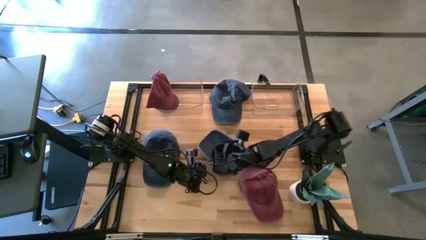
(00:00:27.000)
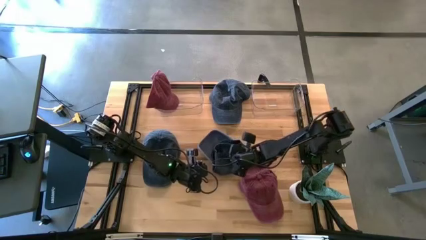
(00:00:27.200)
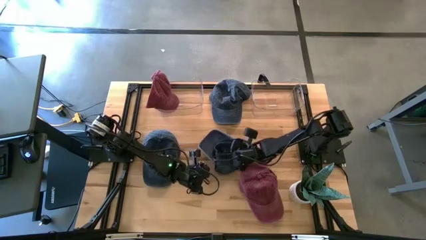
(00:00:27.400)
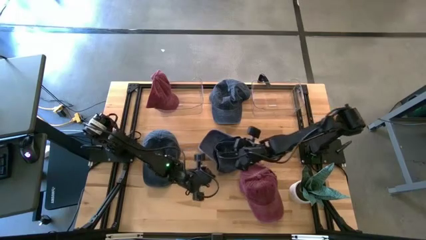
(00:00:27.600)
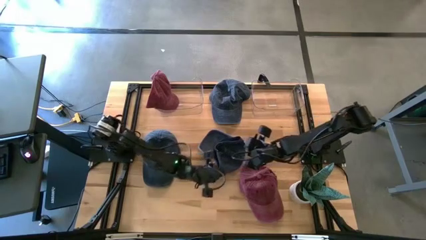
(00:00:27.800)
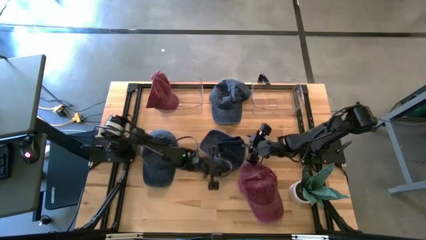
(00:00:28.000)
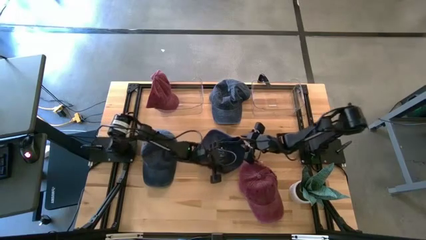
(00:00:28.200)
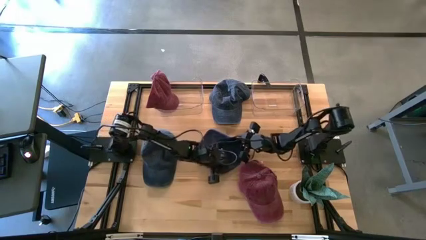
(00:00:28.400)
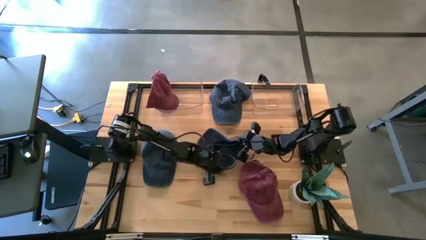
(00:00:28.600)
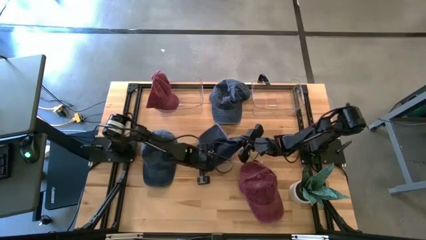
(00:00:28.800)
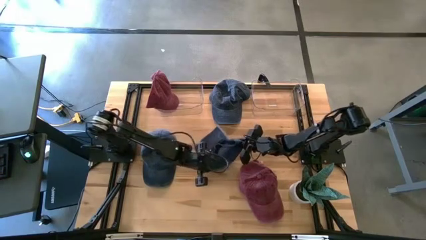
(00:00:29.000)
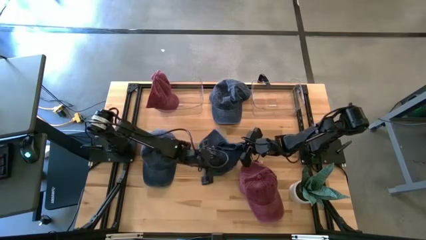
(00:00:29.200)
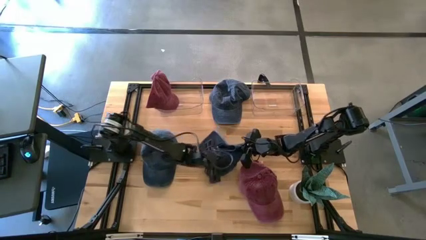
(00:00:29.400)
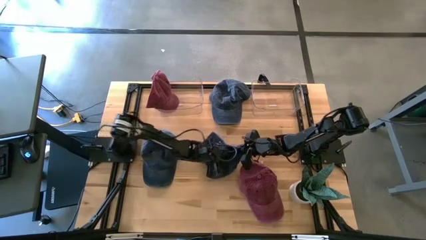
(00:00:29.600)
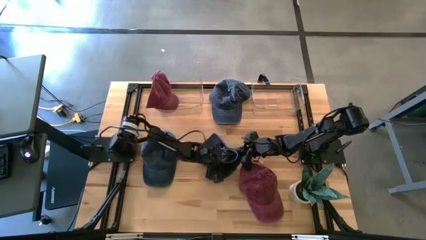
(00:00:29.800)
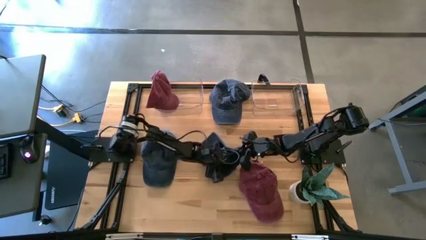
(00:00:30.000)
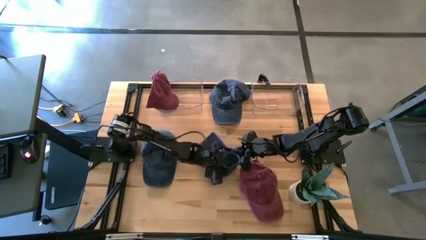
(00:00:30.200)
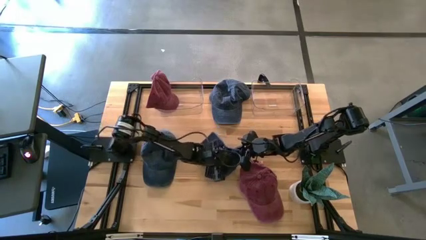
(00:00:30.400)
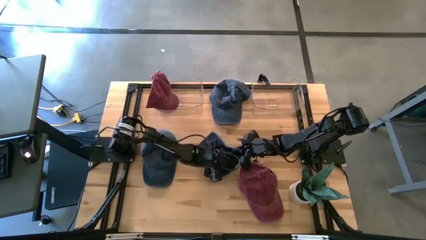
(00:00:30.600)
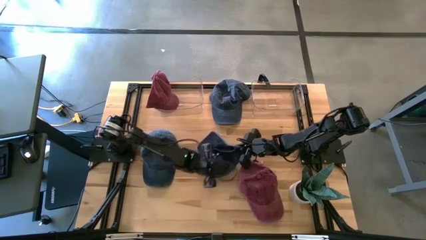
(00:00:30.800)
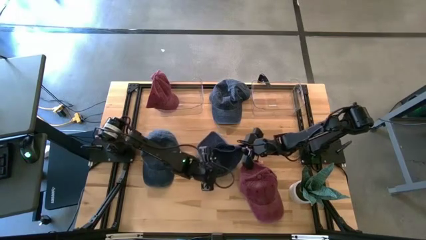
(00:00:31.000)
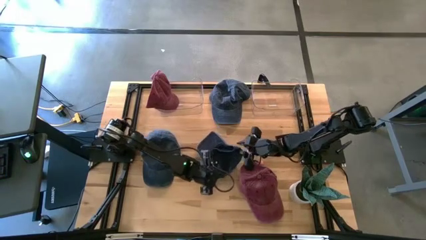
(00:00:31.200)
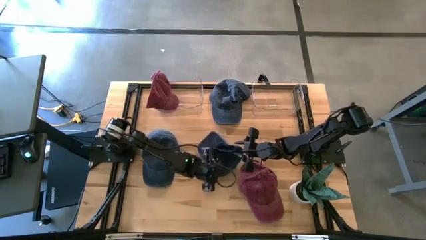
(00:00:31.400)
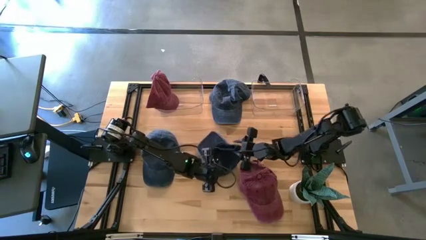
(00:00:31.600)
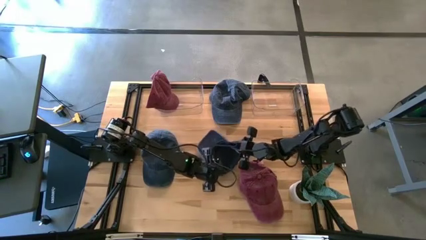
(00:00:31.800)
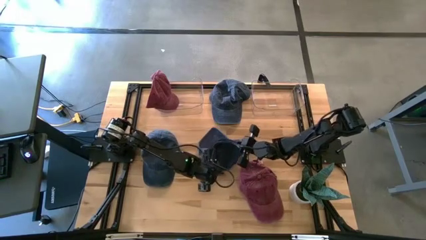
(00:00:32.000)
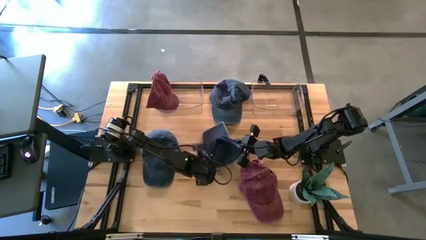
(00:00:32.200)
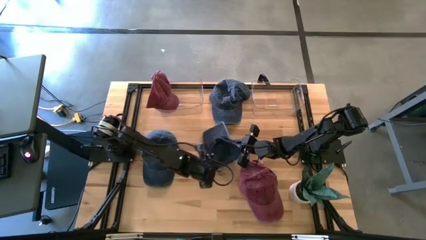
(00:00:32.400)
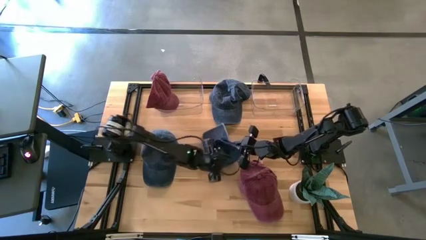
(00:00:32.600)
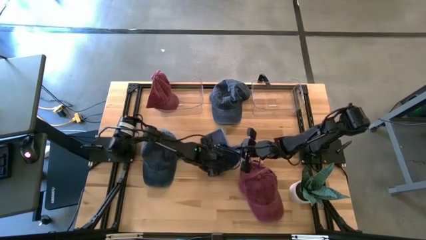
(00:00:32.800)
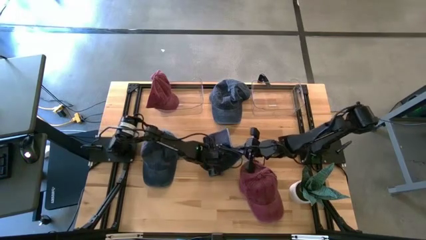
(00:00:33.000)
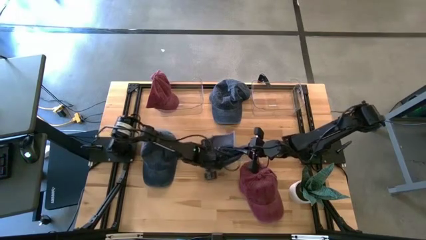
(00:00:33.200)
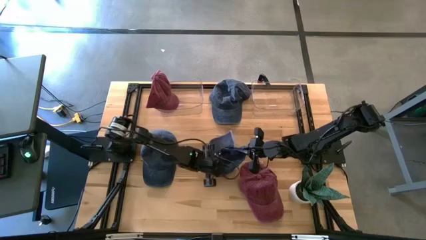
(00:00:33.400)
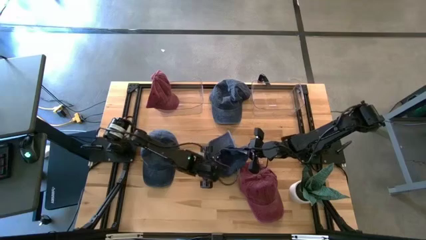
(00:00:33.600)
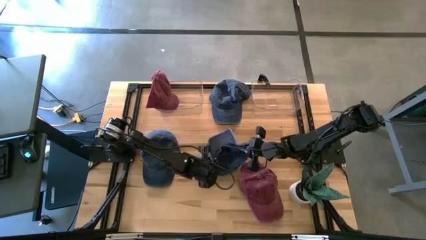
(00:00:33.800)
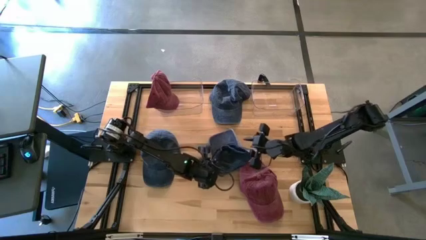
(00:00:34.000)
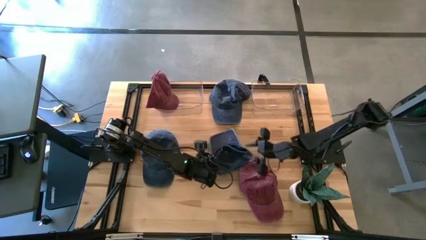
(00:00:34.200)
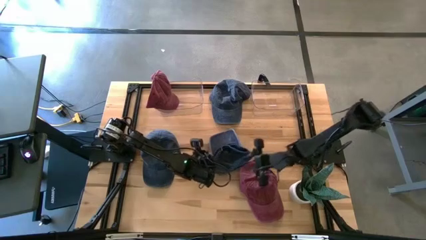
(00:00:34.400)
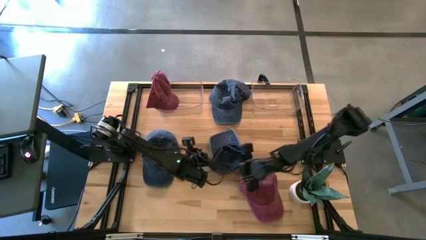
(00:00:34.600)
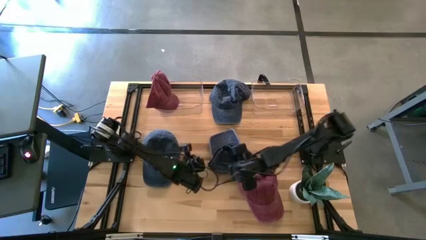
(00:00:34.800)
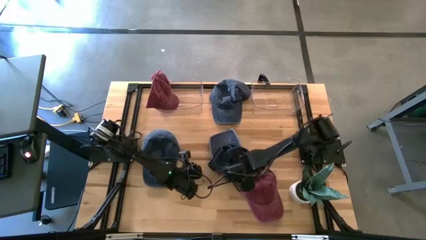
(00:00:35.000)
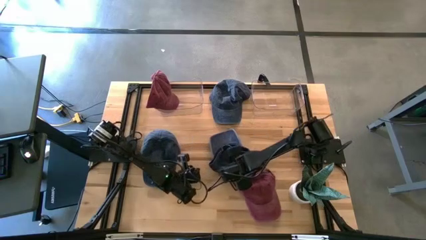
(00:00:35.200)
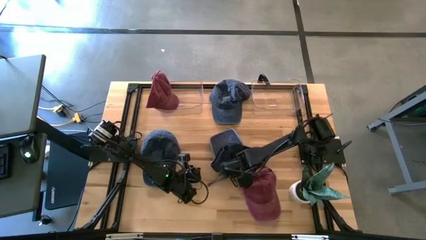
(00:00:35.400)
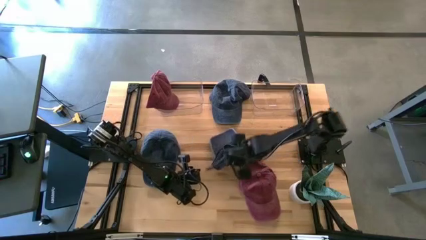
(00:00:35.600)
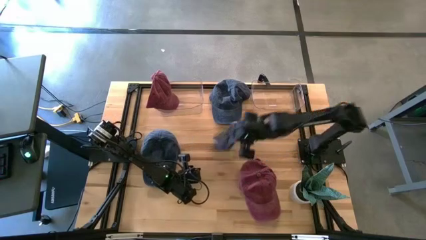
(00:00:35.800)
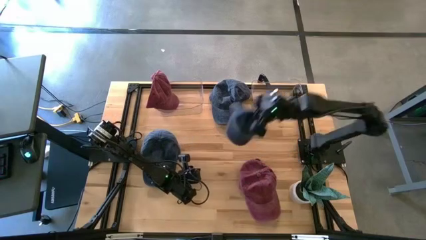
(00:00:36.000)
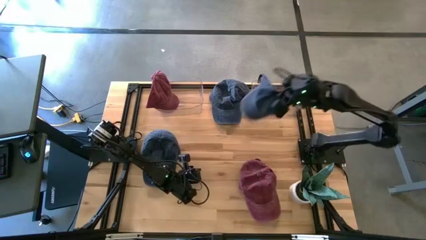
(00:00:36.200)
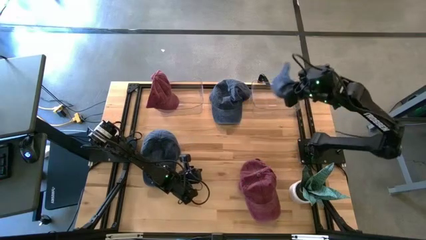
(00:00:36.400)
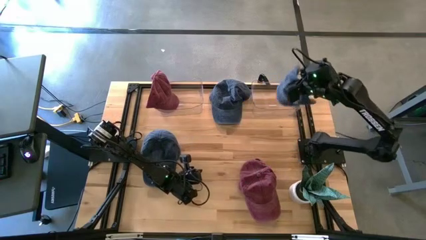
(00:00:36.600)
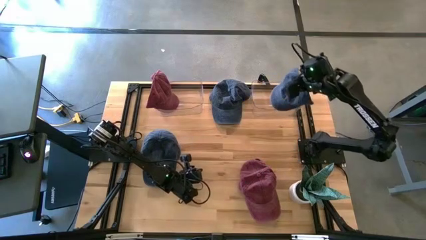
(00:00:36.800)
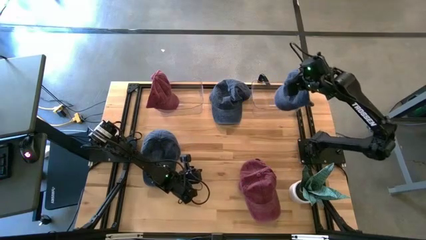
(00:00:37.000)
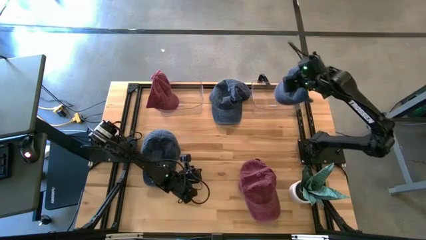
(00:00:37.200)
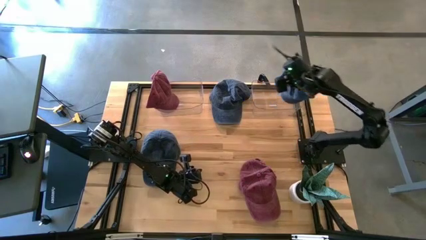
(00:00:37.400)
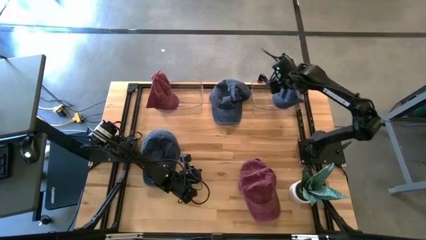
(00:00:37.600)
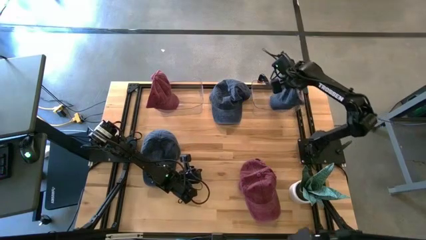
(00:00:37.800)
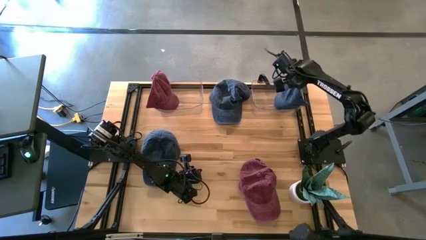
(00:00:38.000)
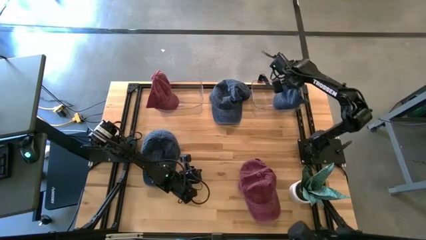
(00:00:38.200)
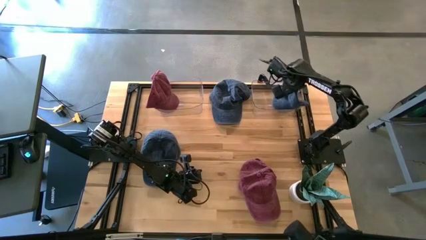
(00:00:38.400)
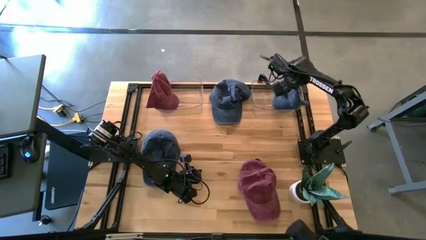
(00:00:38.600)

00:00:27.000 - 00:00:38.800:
Task: Pick & Place hat
Put the bottom right blue cap into the right transparent bin
